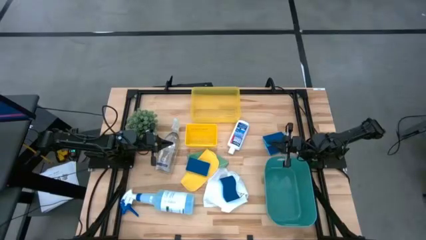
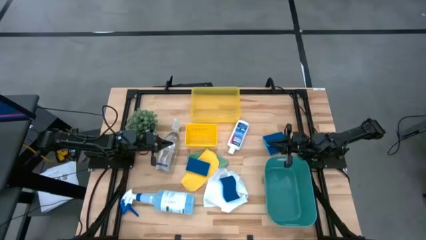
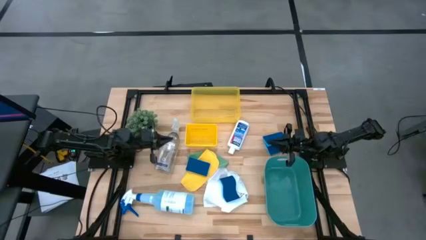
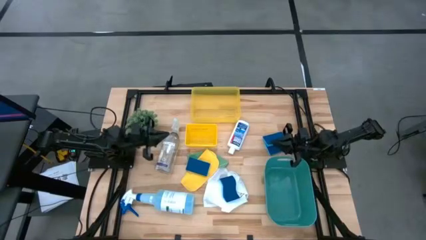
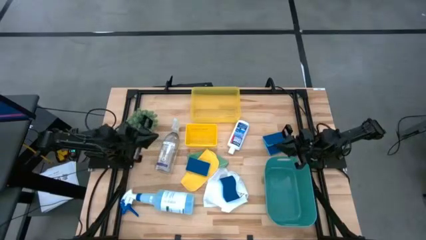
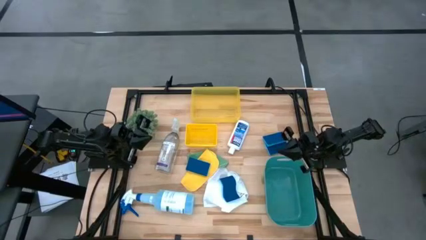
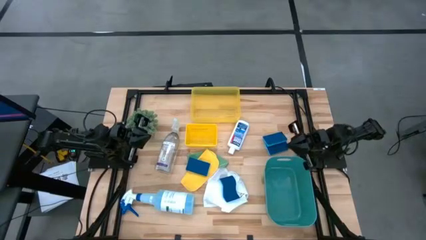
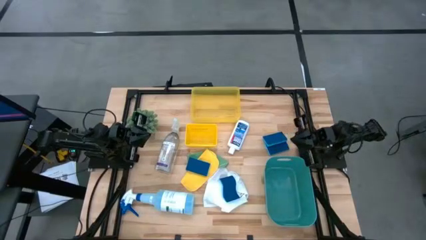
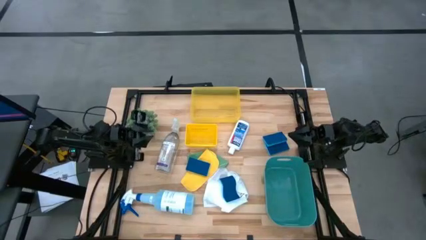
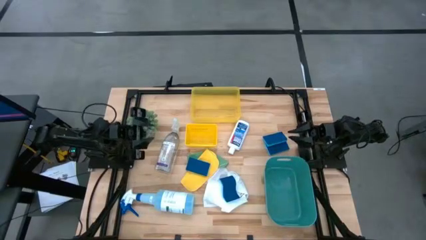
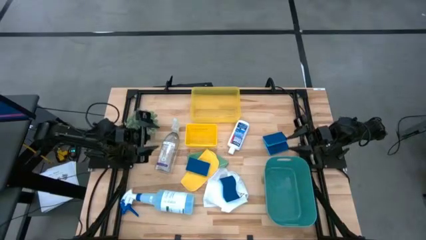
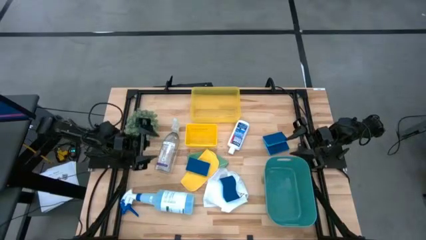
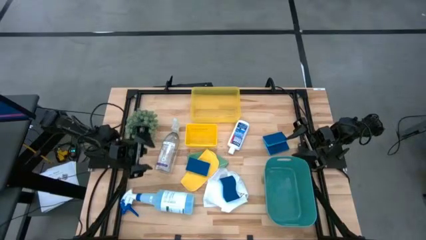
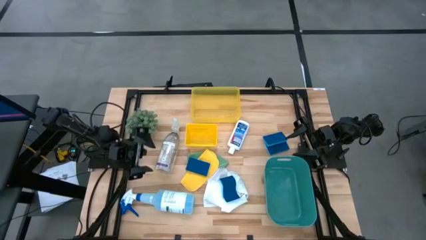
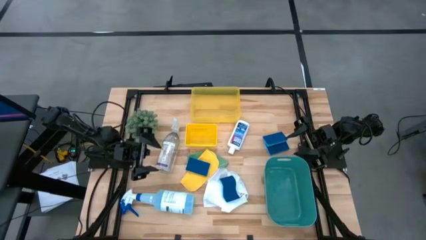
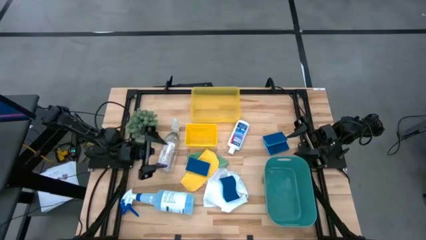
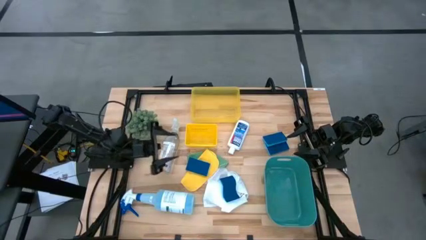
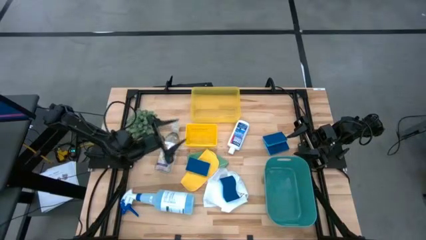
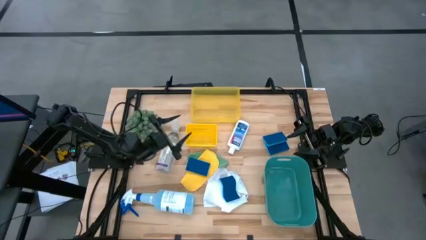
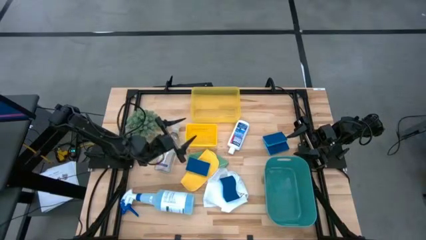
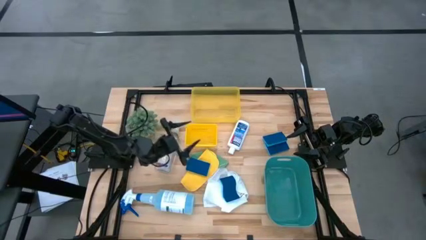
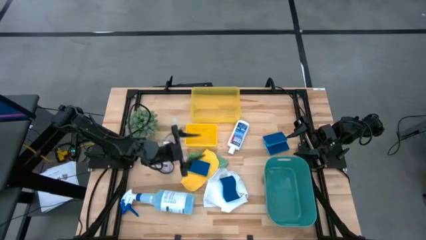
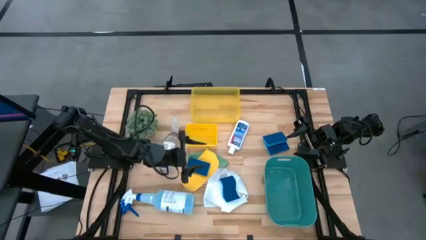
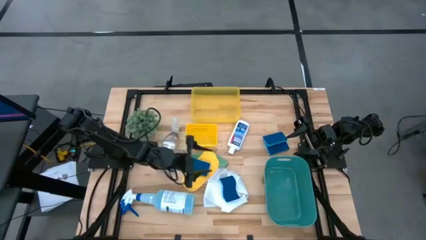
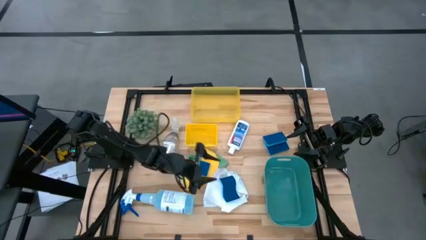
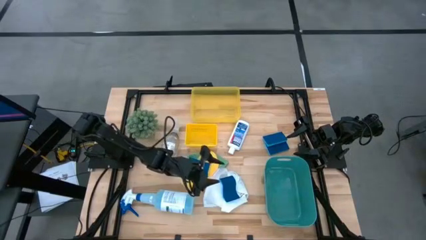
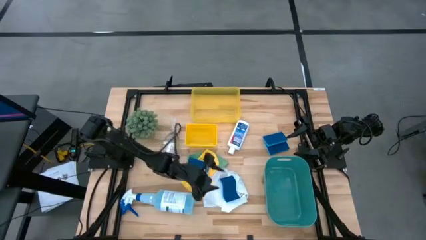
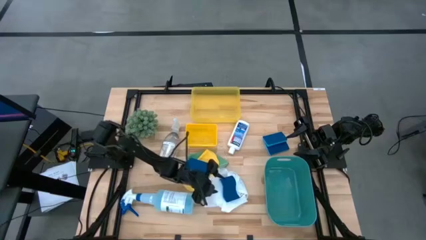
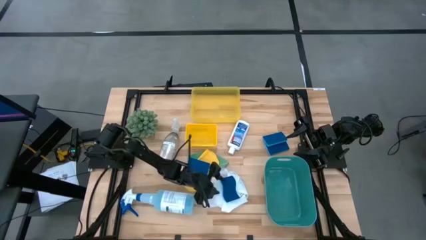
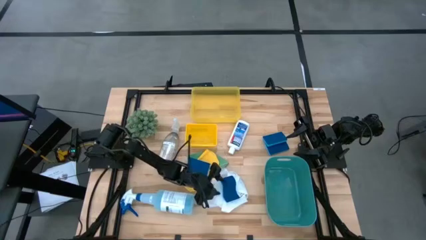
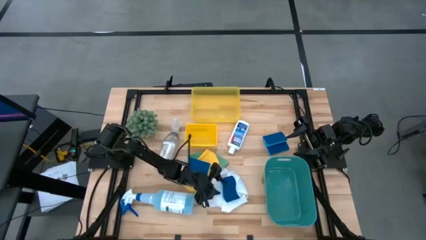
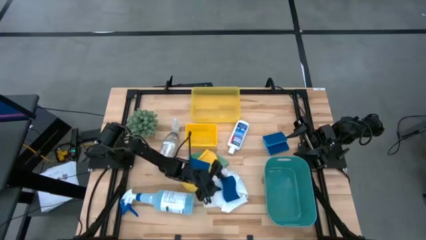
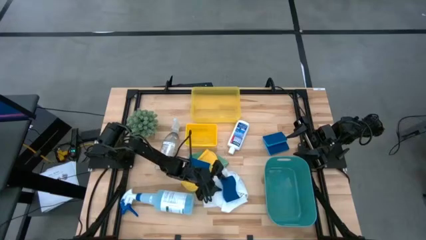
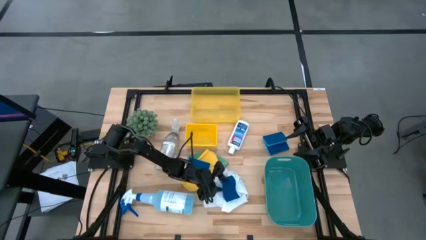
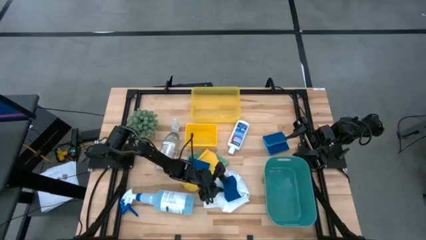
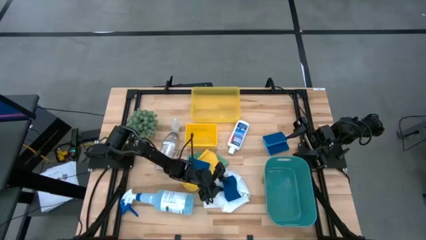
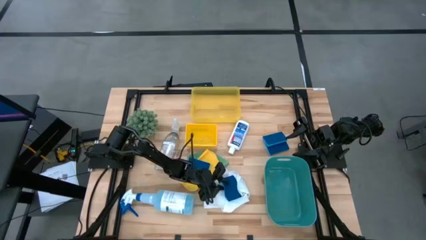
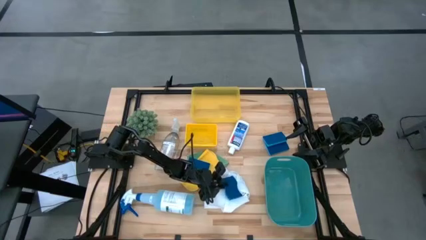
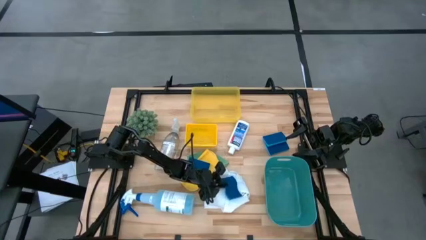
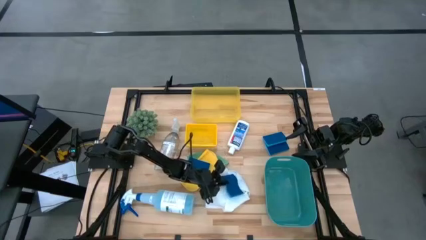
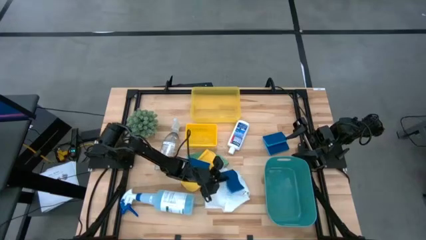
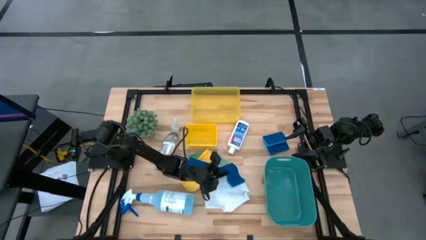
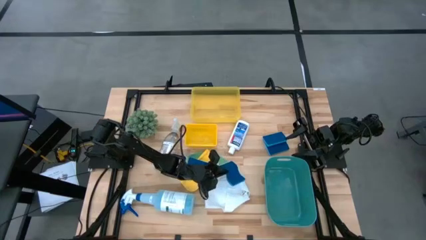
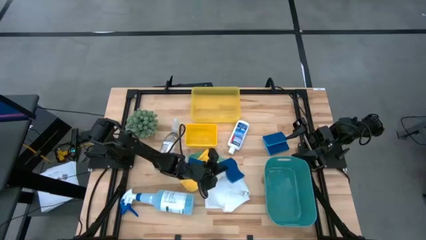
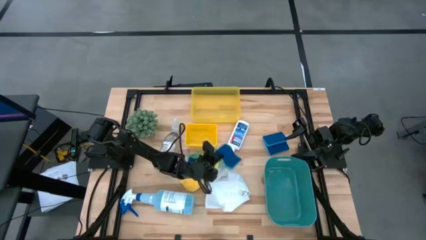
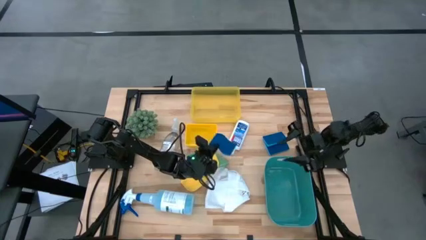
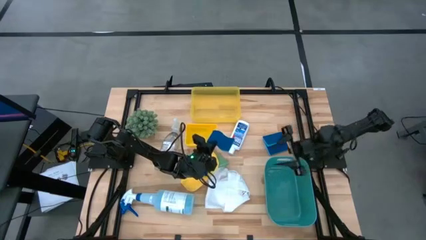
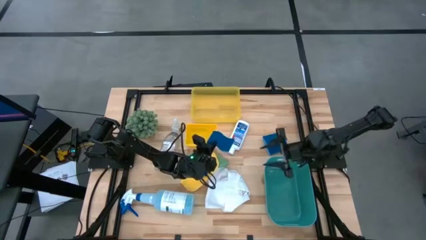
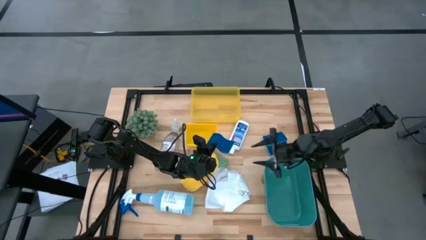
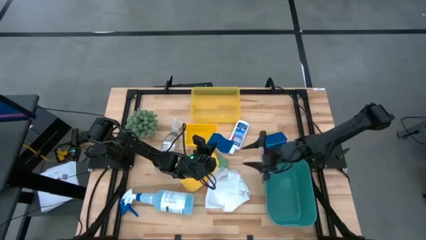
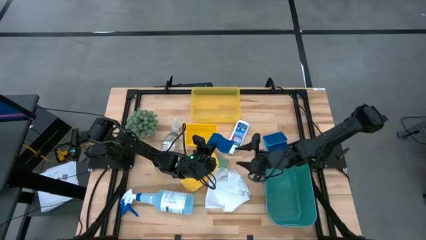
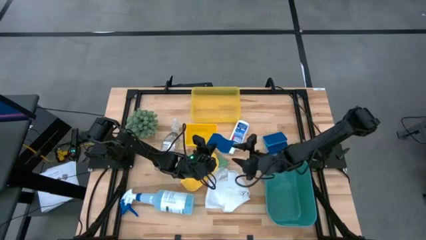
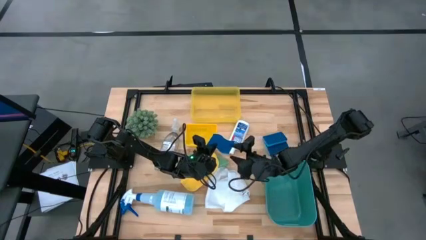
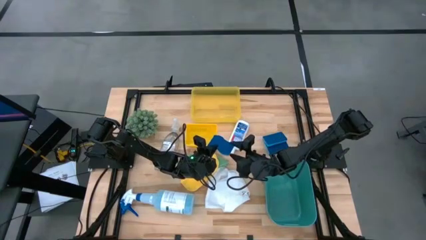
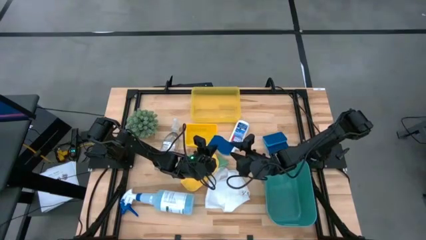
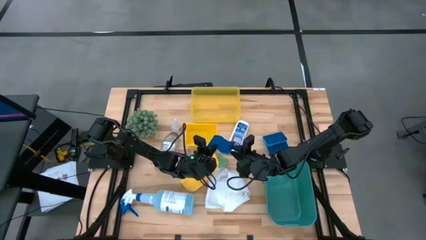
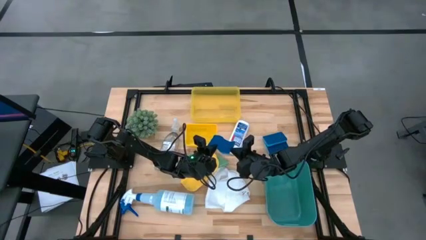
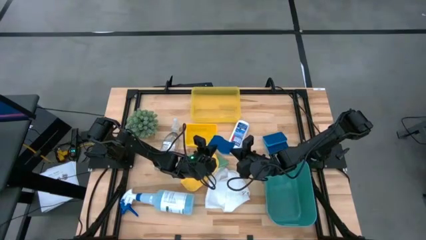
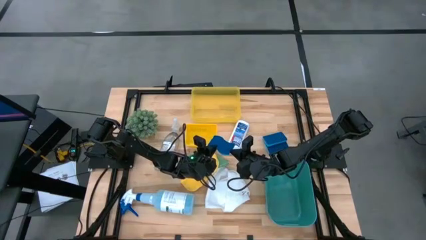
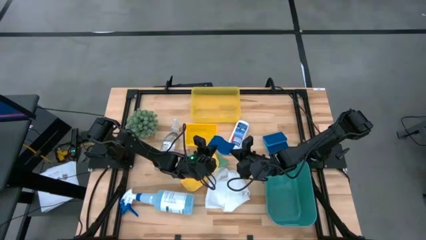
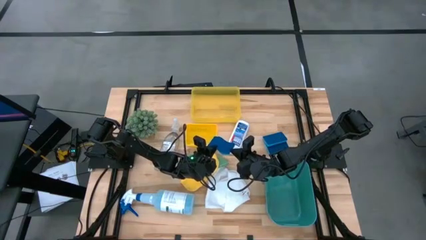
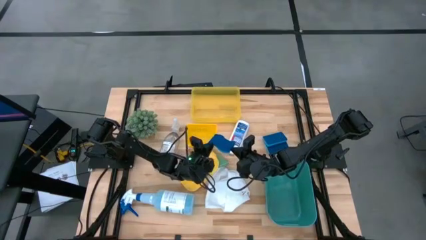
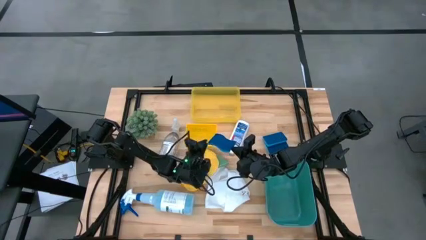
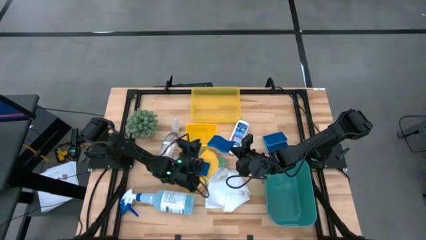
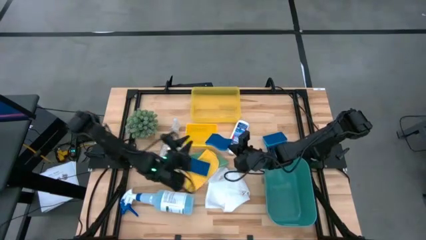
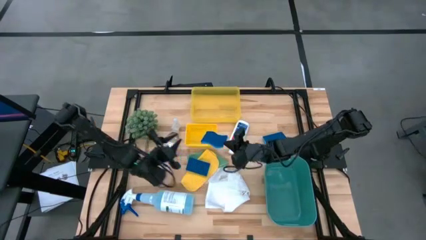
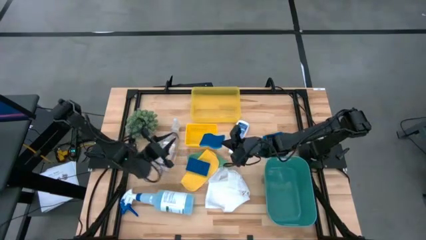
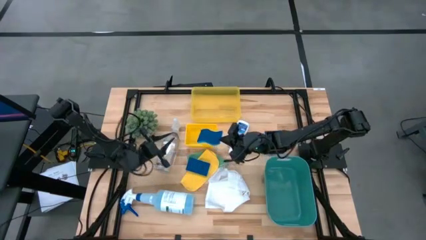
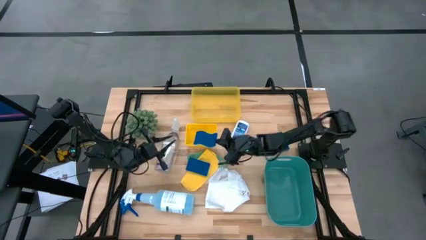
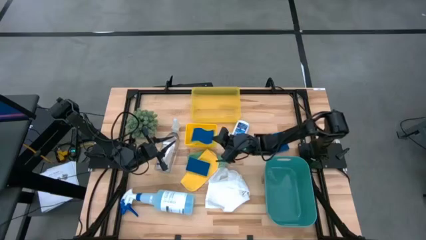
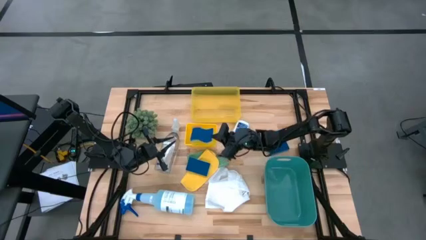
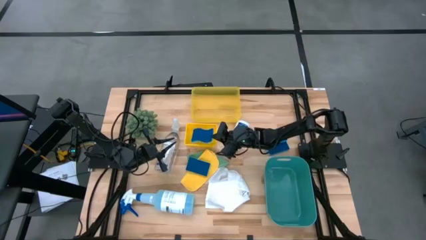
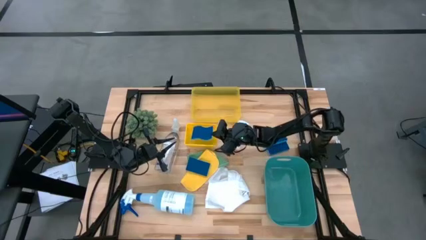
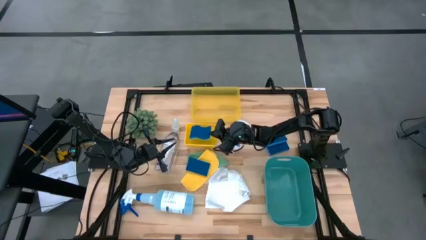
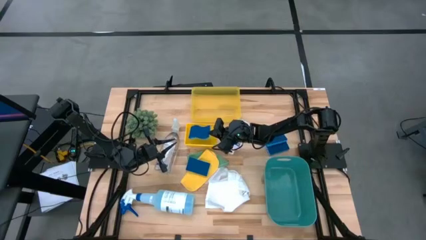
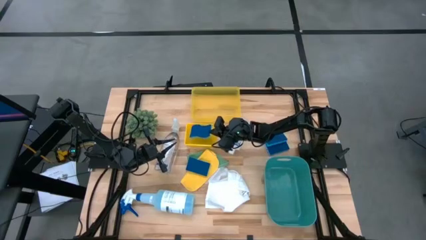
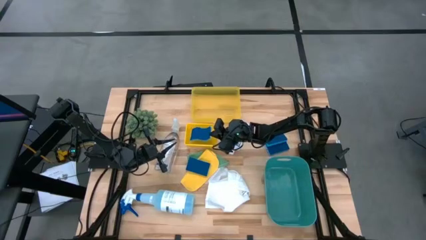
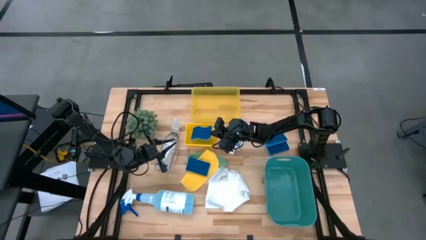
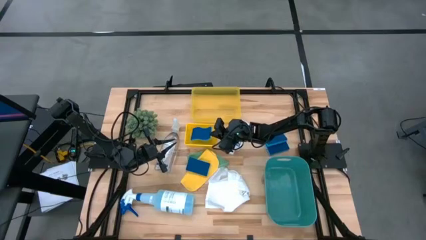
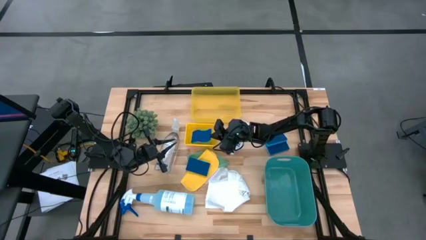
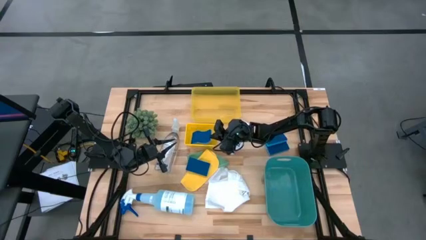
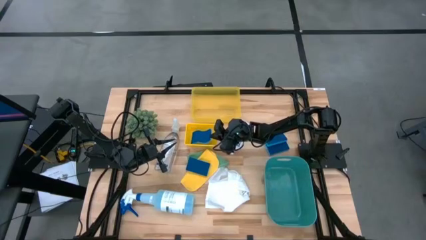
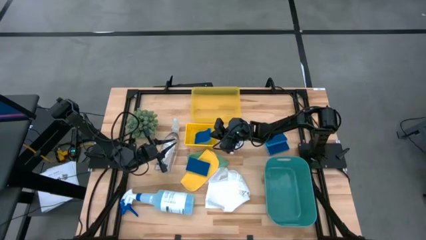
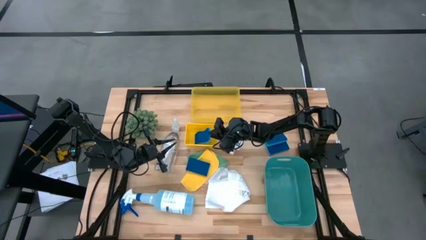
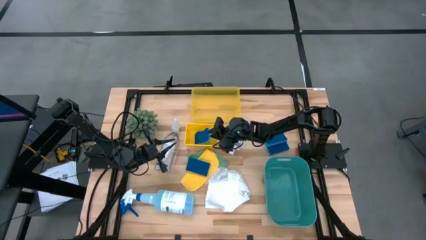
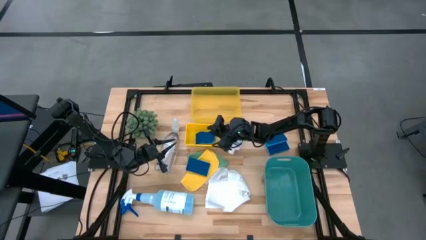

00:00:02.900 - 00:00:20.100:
Task: Pick & Place Kitchen Items
Put the blue sponge into the bottom yellow bin
